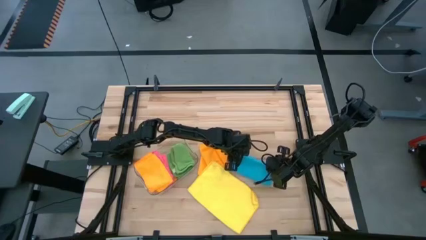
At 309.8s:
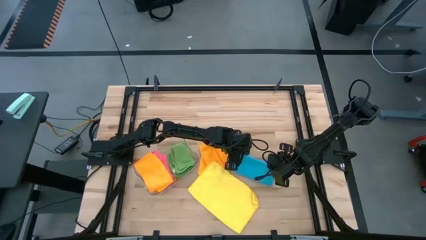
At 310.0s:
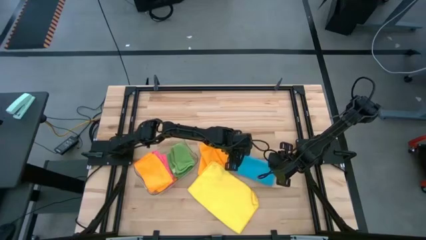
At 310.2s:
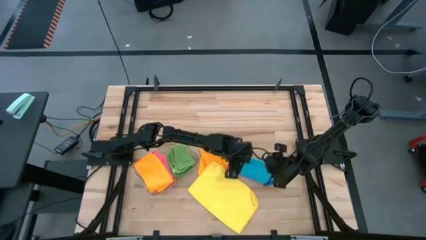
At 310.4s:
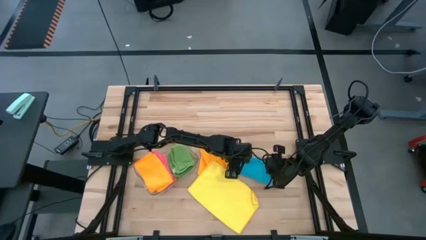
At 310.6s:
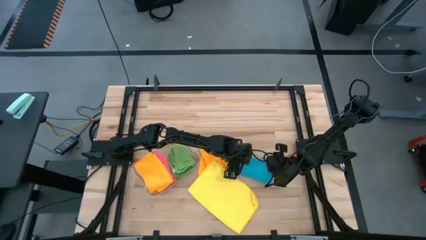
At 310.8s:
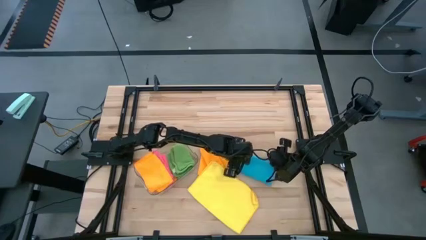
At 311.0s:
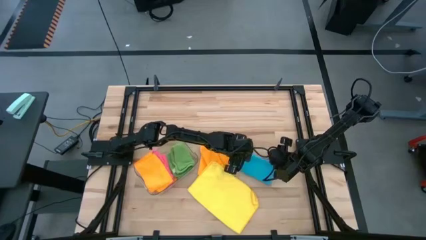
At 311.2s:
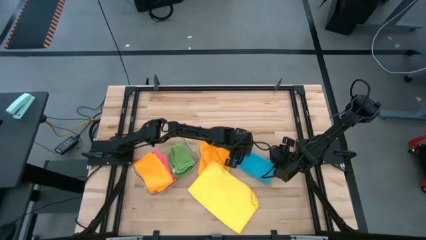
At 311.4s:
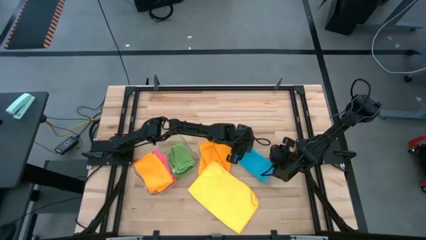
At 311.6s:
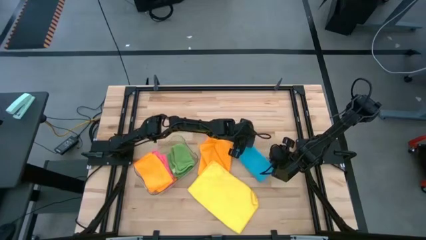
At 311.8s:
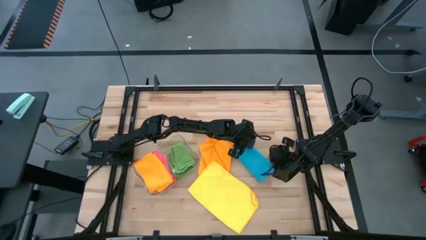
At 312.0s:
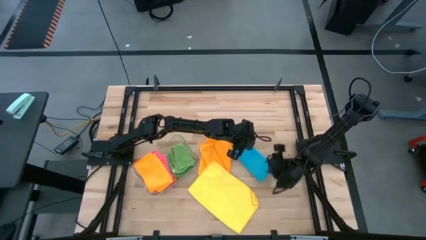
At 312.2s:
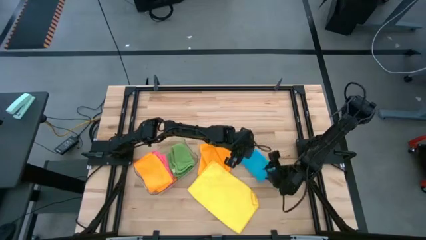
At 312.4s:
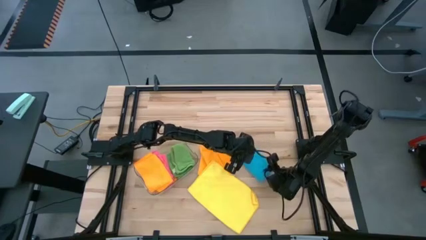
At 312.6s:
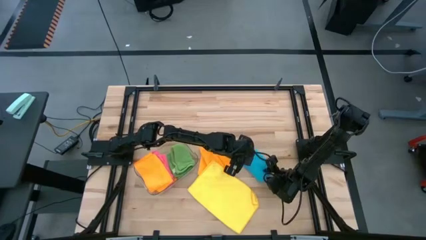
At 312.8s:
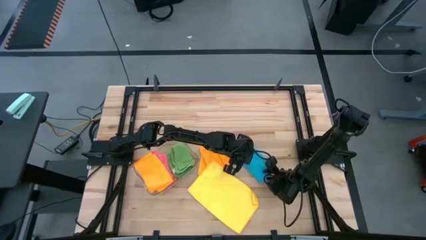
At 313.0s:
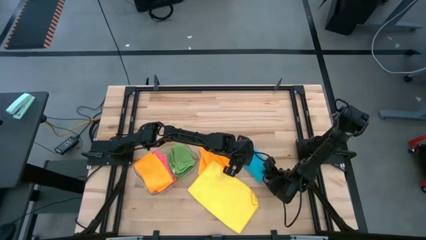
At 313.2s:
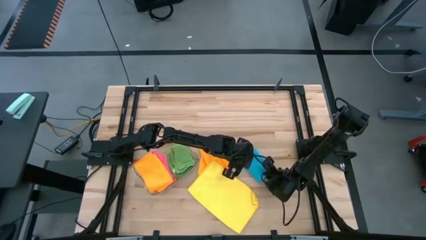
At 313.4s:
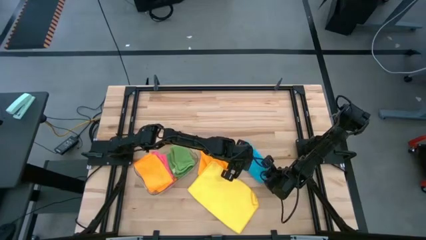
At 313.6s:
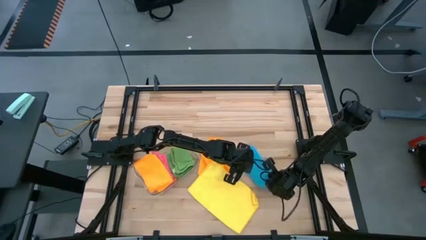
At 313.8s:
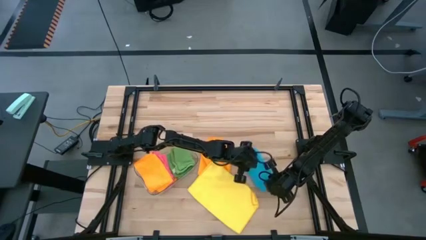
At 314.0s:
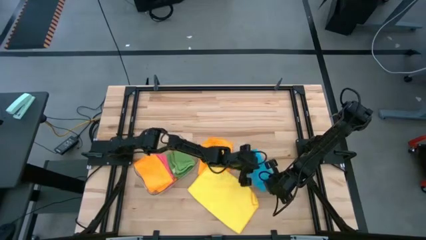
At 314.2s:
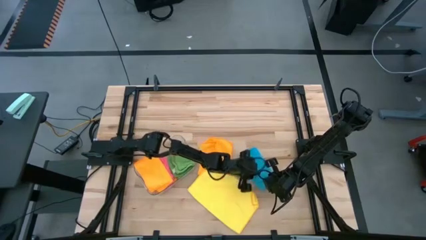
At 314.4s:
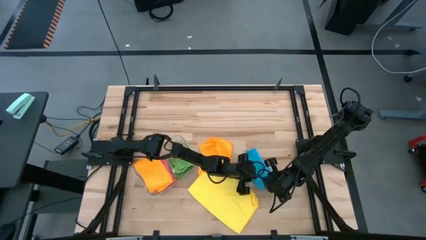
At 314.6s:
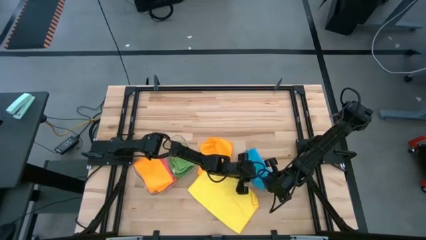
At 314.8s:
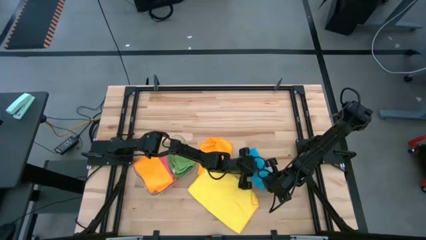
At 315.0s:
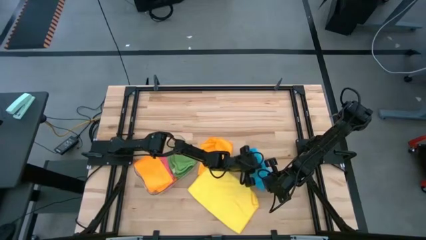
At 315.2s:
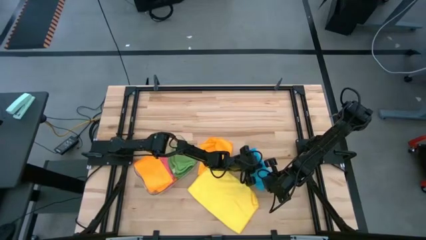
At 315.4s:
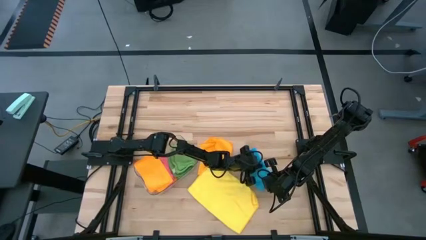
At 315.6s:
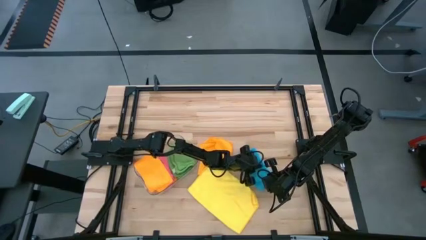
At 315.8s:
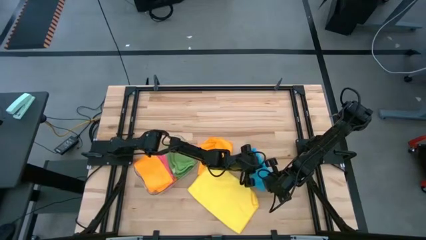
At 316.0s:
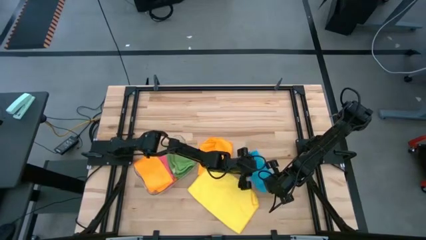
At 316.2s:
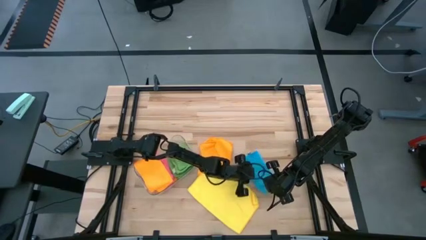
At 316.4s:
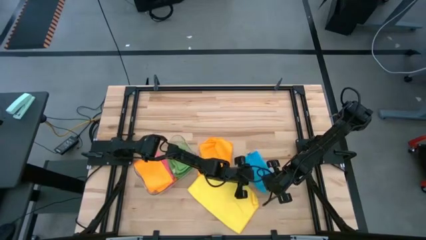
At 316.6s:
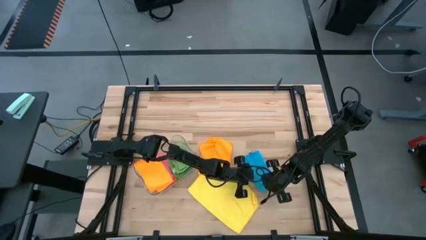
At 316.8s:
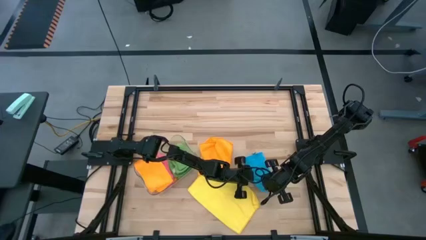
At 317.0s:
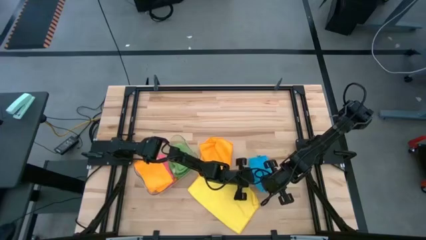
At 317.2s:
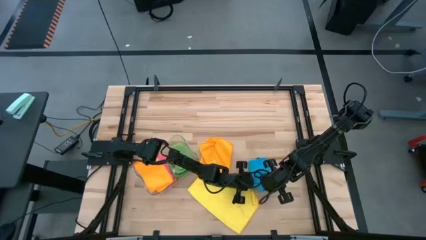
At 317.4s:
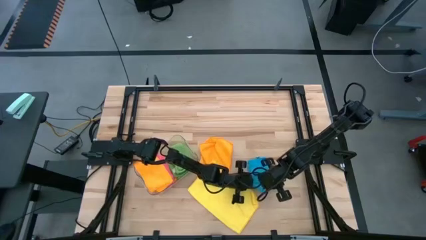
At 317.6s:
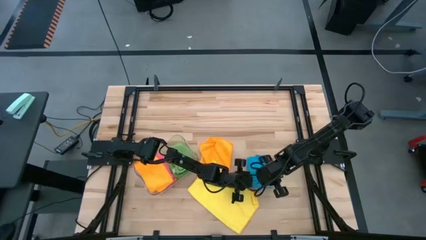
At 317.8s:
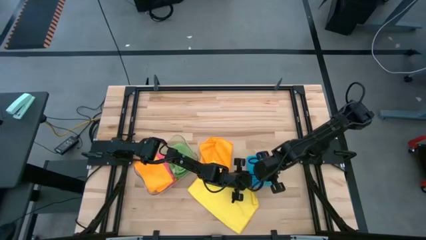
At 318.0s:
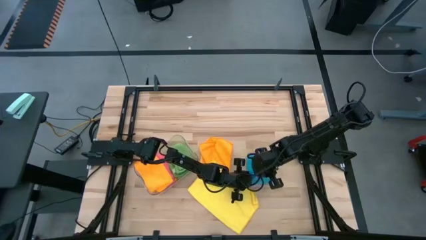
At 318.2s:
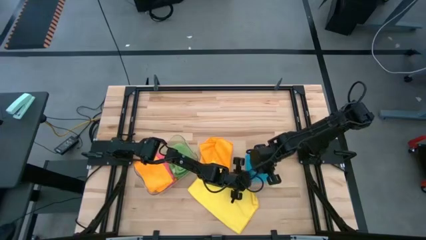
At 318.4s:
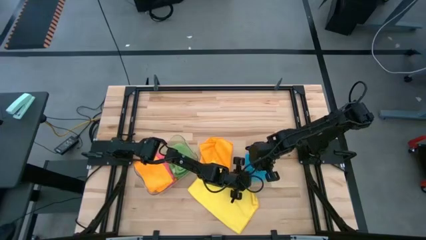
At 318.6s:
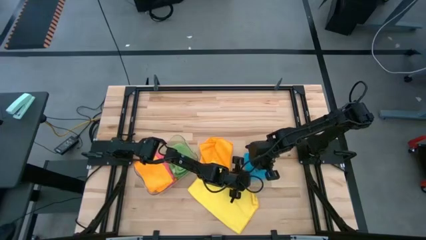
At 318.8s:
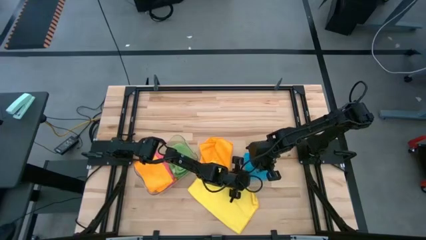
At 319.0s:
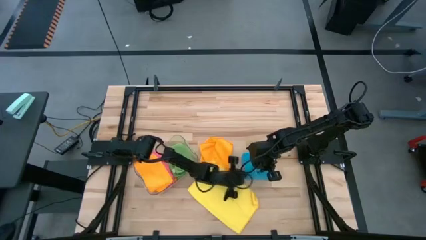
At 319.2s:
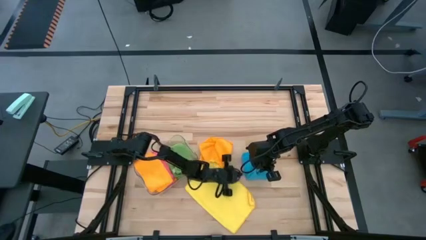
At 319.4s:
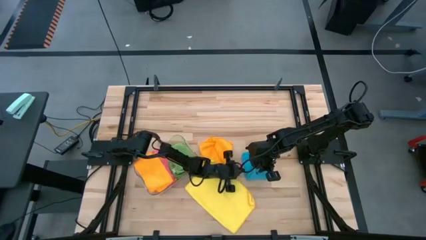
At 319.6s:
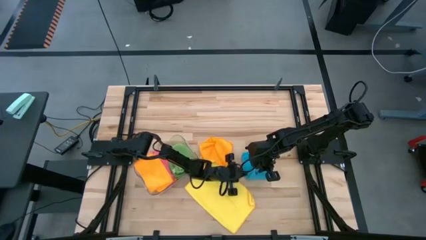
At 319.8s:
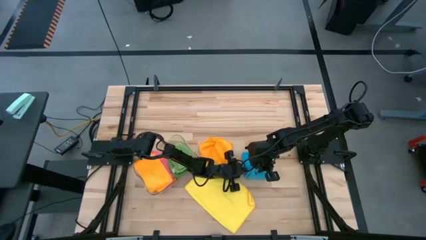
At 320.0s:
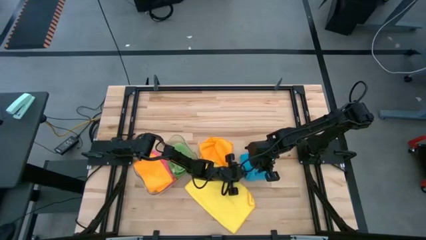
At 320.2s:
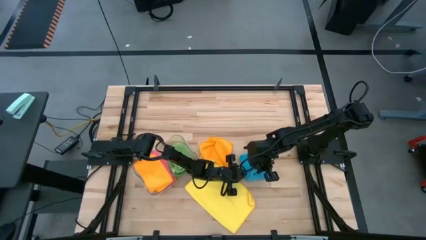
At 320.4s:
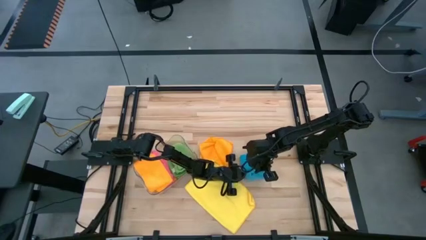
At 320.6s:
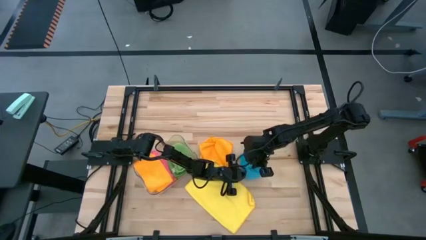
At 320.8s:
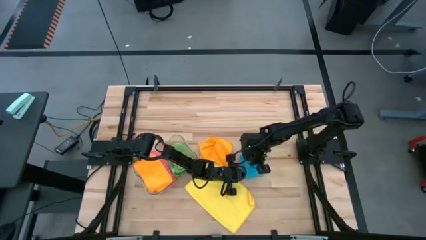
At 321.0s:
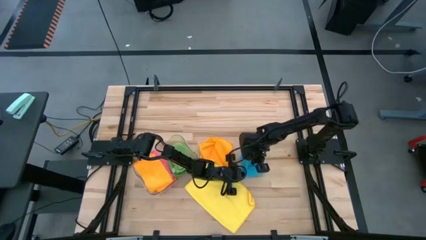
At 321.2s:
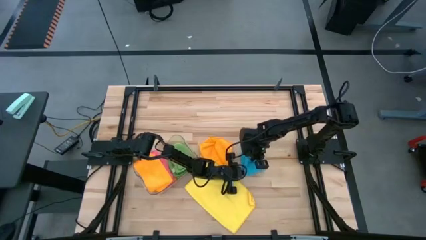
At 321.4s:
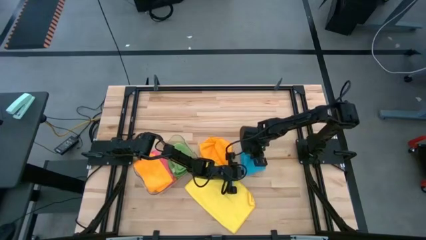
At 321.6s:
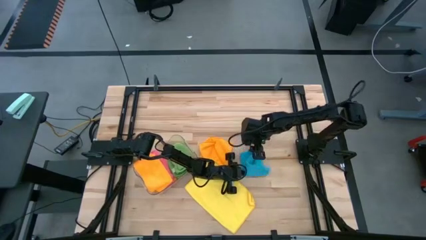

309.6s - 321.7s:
Task: Fold microfiber towels
Fold the blue microfiber cloth
